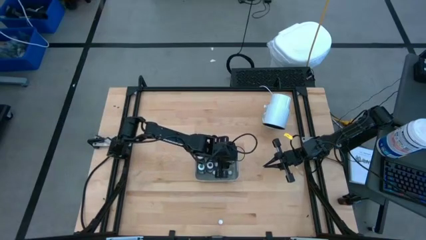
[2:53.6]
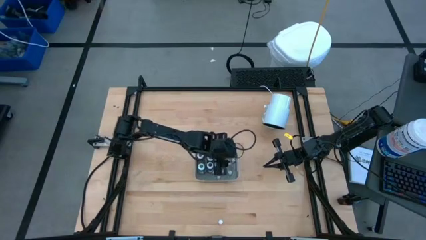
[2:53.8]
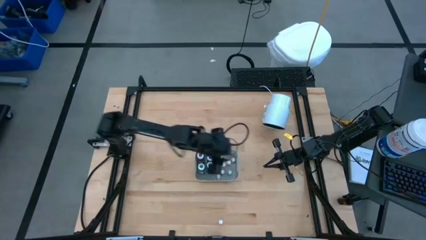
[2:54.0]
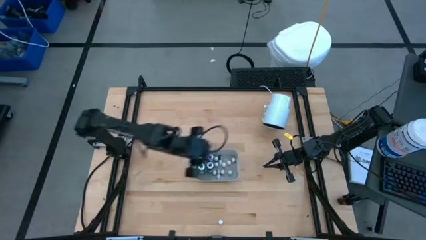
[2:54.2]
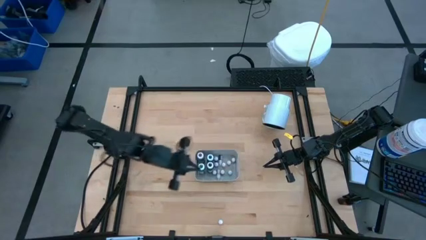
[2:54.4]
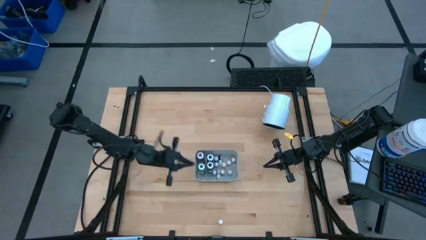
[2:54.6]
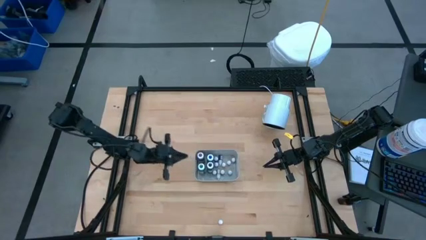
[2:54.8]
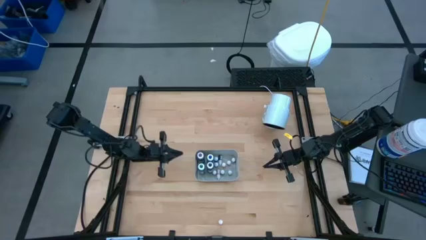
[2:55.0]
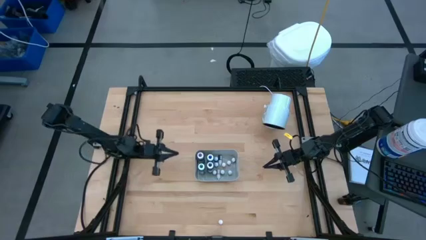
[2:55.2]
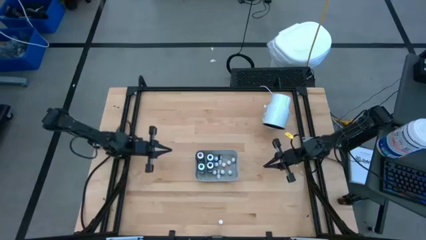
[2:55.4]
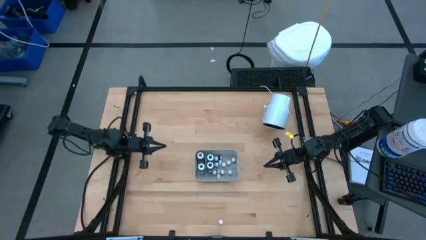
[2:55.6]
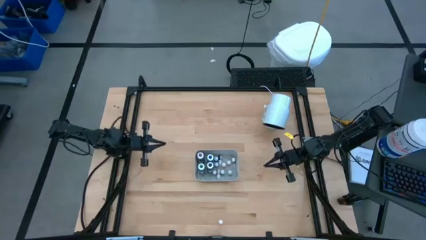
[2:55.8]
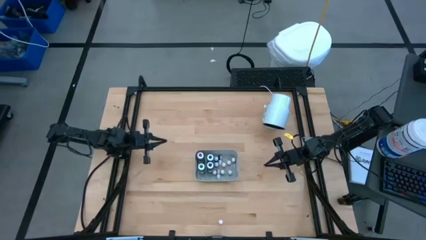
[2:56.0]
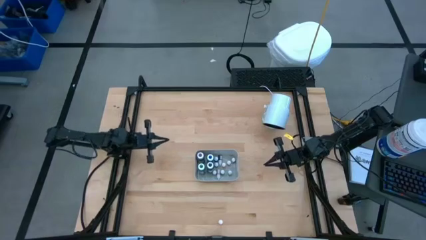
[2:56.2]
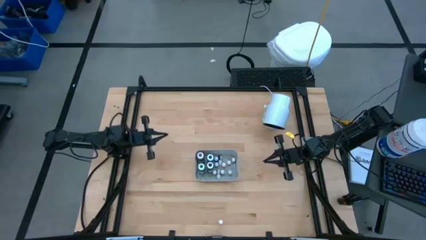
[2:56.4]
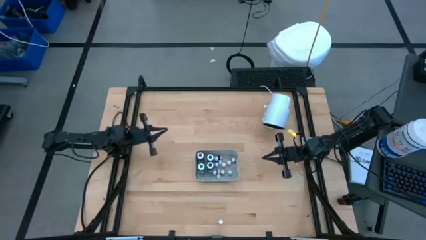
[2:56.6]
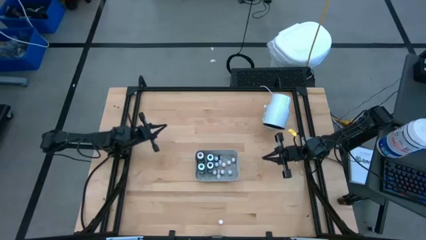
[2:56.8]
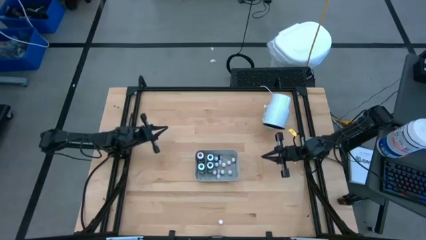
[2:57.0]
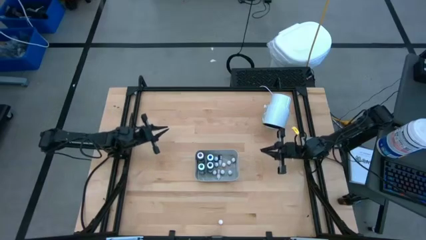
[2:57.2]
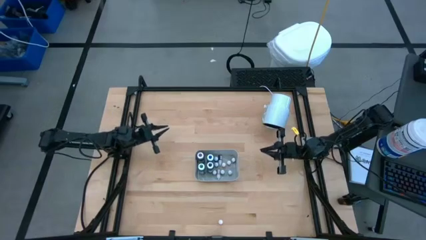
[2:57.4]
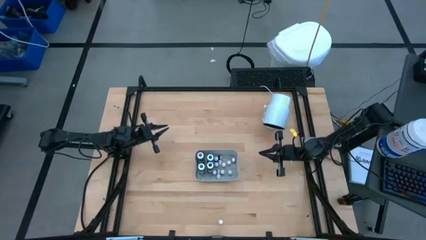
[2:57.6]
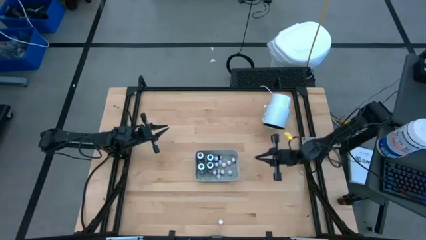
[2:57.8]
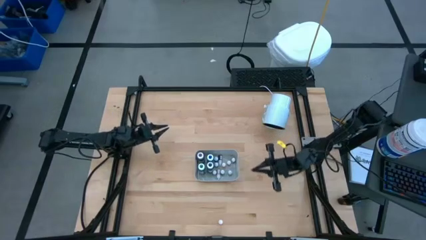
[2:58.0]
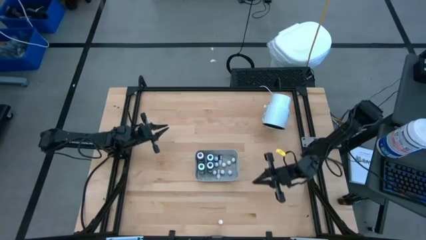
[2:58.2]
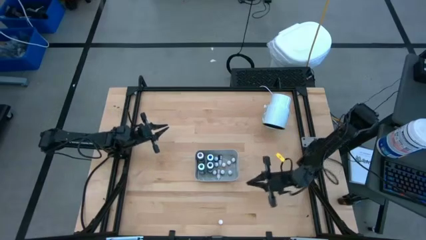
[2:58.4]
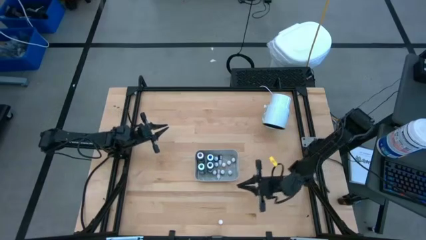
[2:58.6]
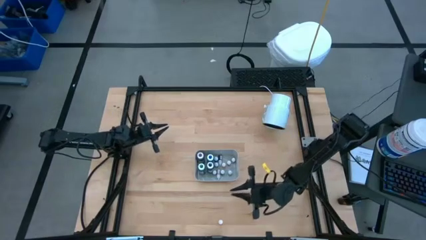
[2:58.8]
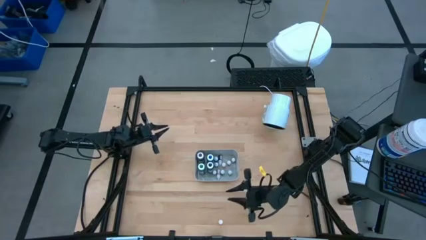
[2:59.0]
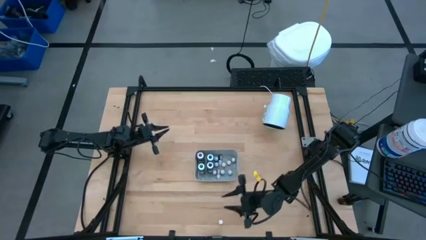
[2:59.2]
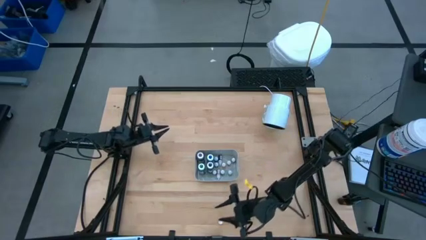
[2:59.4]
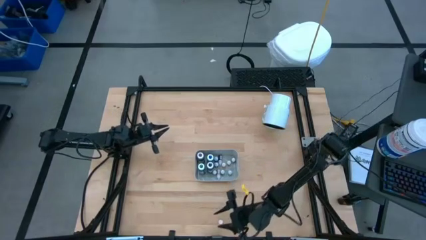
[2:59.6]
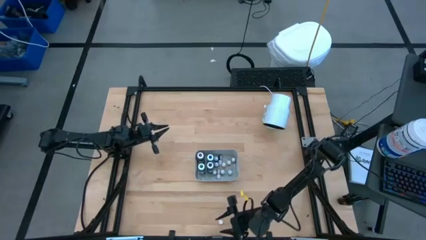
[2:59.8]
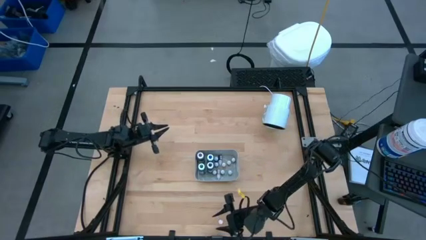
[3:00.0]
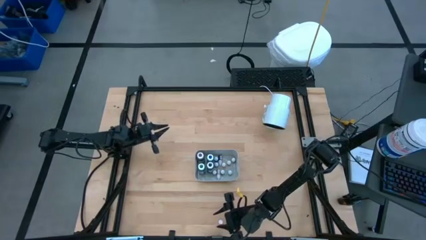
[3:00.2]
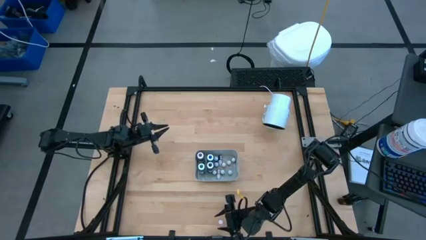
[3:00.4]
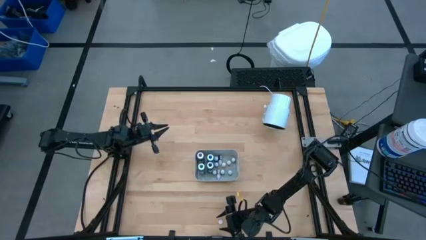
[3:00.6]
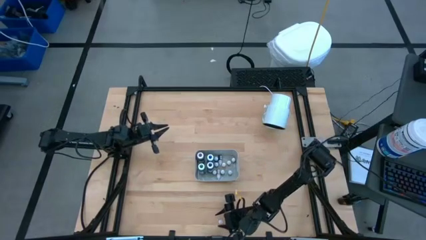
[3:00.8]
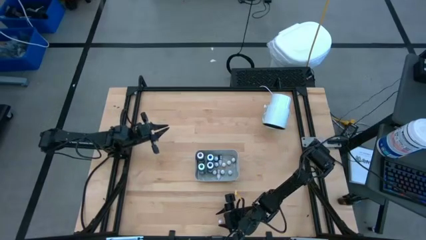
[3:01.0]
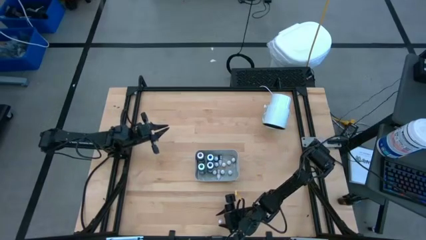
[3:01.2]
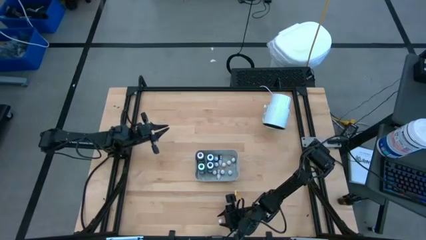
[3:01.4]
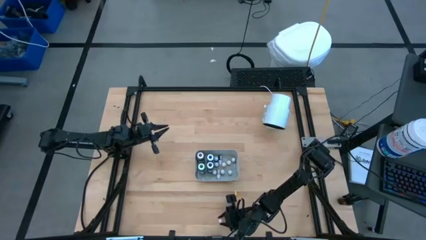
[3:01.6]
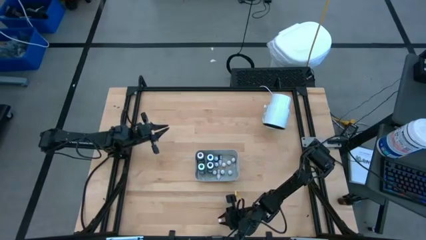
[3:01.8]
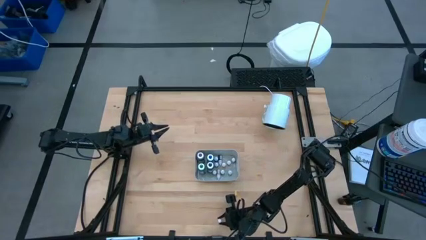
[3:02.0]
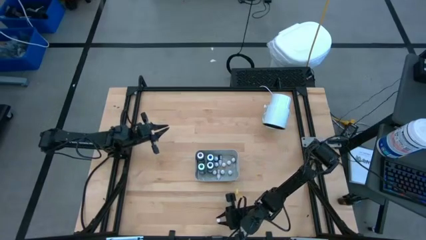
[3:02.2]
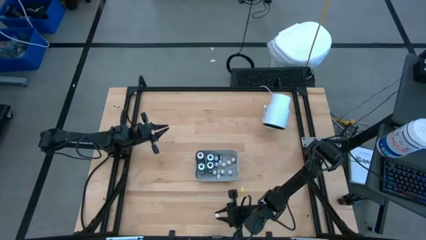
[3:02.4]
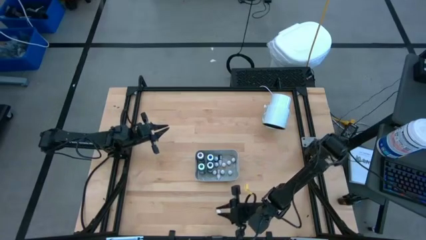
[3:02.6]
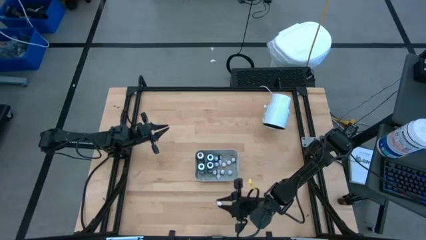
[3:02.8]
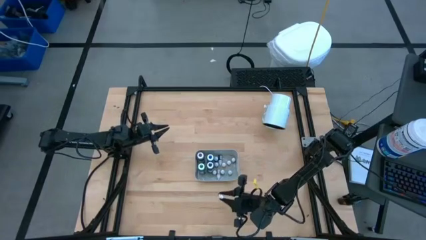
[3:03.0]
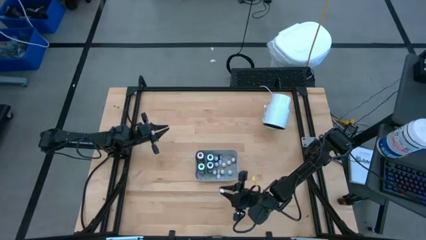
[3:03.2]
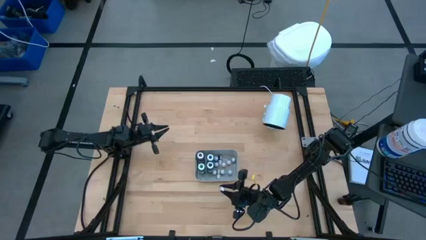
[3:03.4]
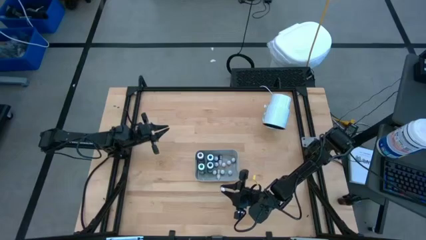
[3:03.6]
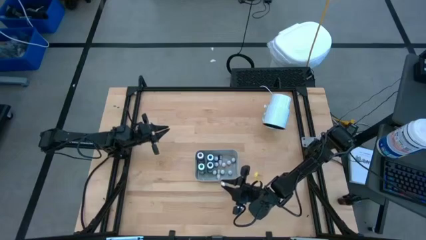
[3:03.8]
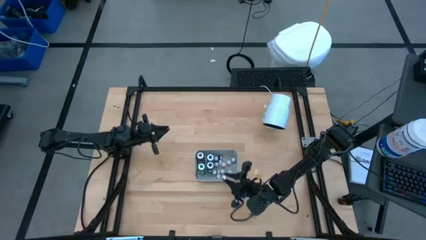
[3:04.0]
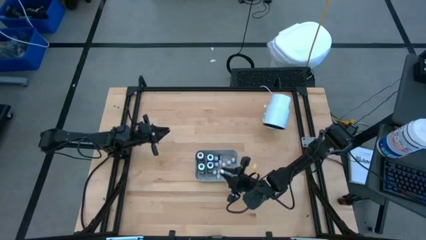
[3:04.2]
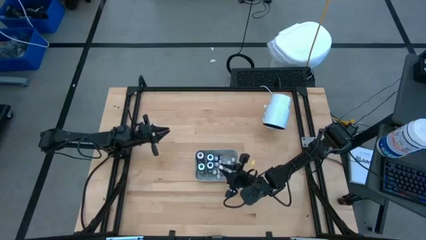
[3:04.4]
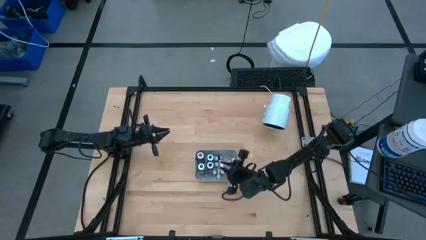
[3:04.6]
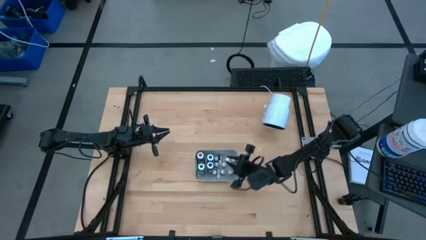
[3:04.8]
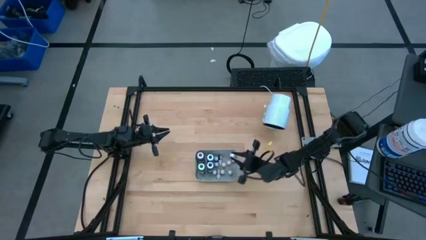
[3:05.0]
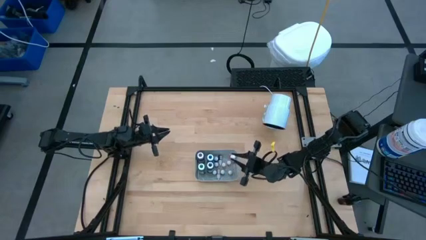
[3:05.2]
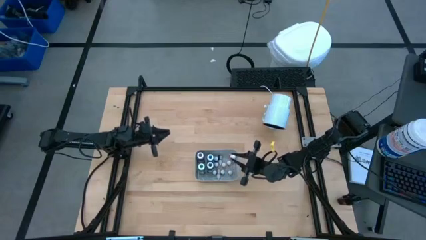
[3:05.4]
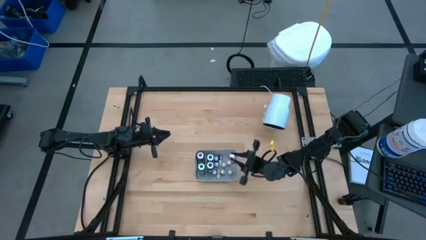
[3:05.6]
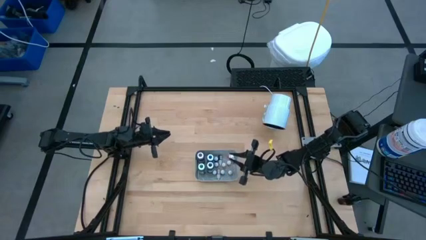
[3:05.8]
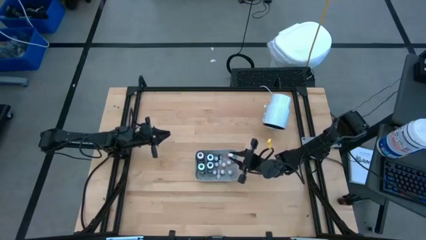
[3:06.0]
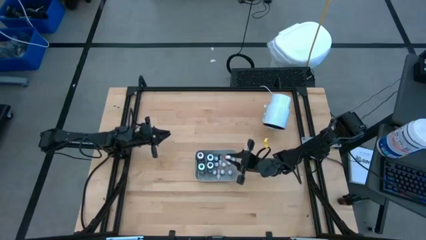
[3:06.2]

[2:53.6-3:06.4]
Task: Pick & Place food coloring
Put the small orange food coloring bottle into the gray bin

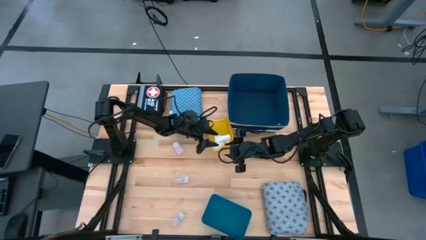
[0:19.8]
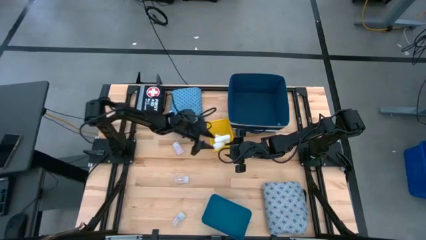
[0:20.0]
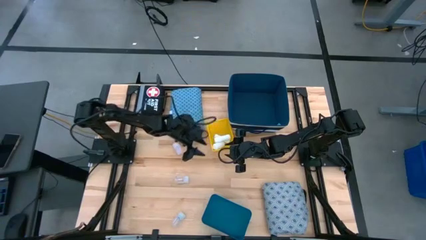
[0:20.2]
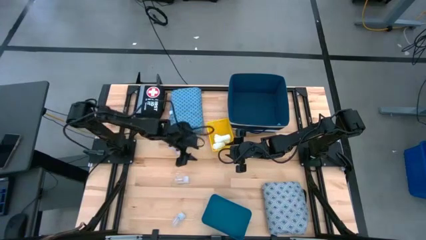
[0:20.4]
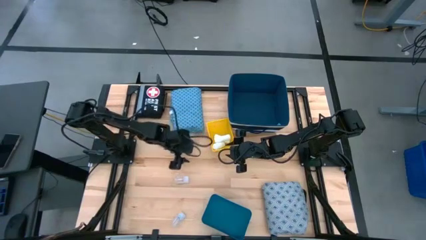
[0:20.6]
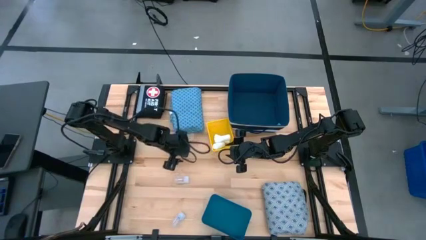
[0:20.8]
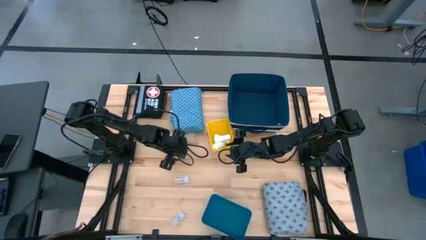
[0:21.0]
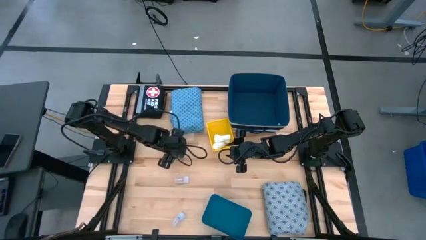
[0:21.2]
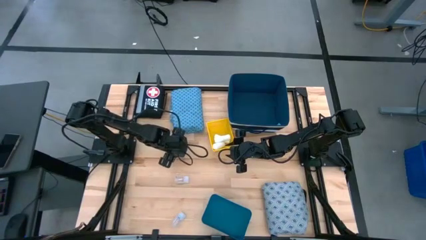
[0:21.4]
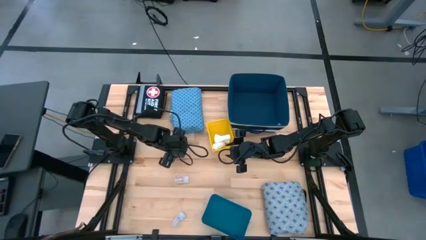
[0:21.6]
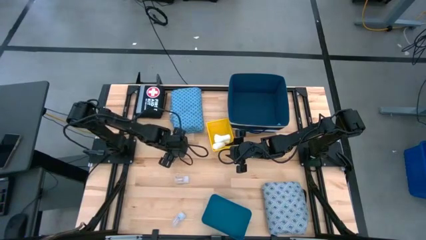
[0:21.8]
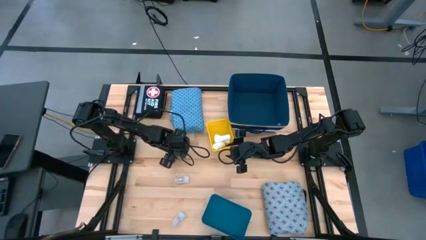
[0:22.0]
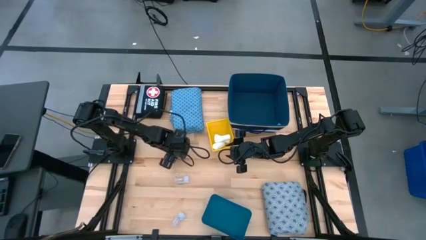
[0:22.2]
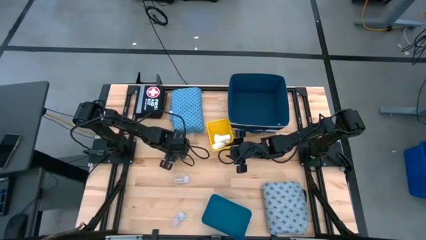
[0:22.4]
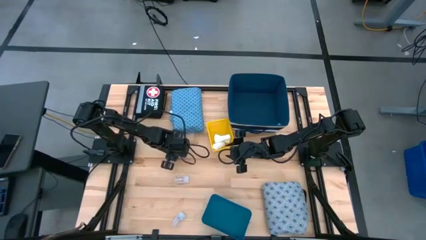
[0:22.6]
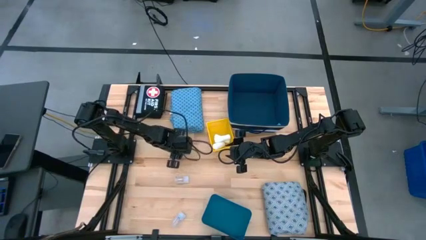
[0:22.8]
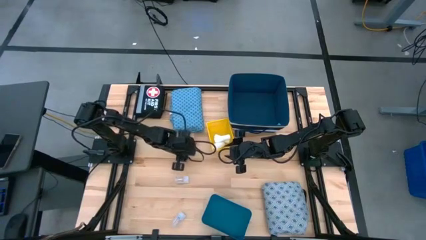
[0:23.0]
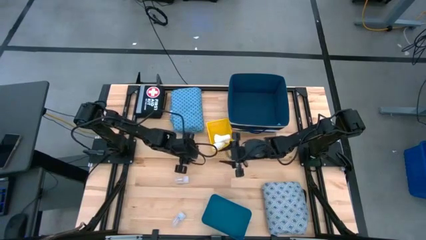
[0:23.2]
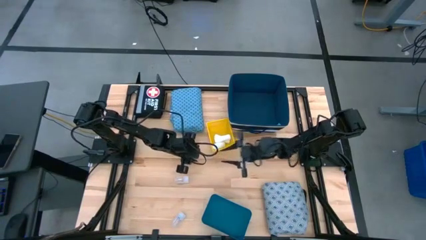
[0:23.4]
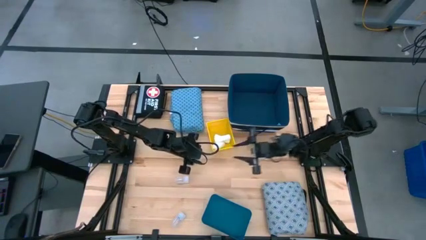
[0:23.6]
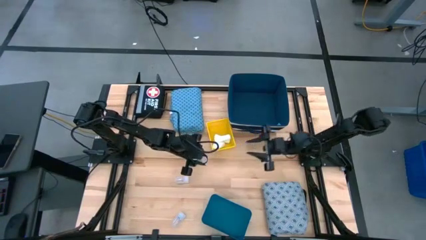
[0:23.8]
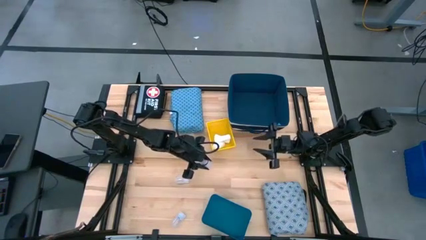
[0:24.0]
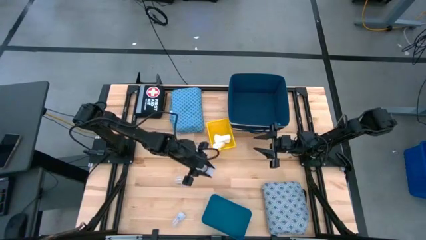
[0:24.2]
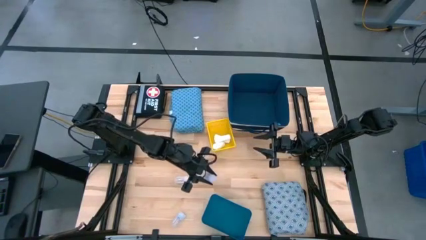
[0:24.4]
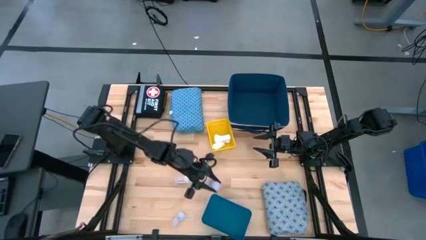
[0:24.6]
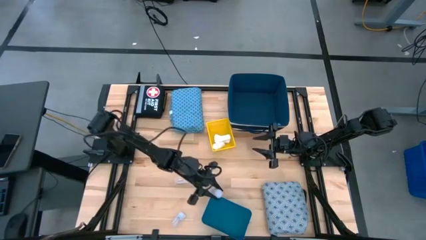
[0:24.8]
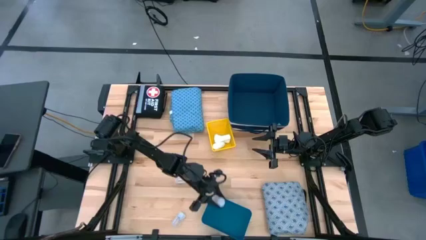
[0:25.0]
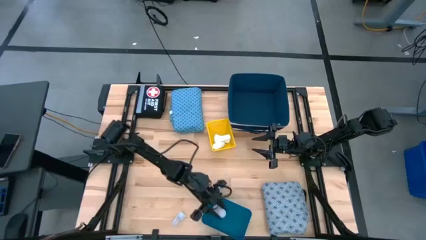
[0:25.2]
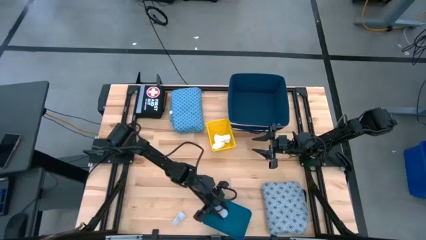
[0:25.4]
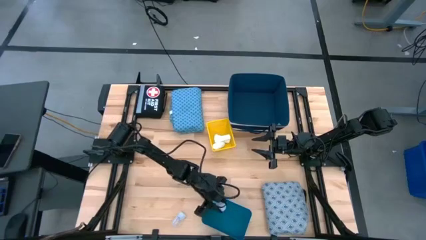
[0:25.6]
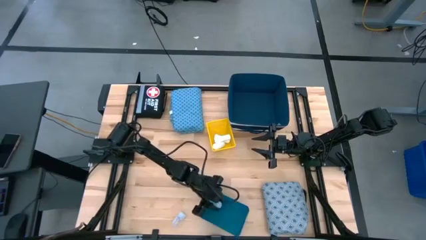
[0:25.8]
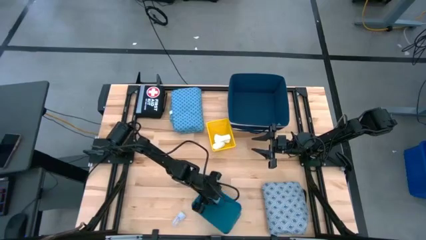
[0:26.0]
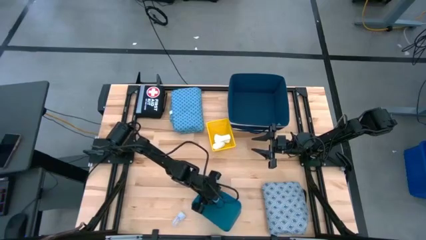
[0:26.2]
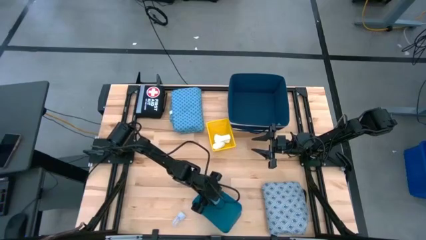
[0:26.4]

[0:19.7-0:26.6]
Task: Pick & place medical supplies in basket/bin
Put the white medicine bottle into the blue bin
